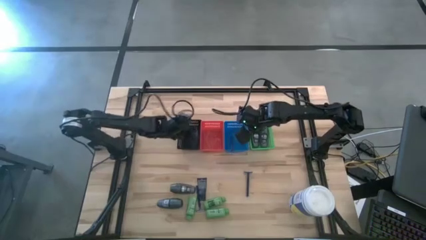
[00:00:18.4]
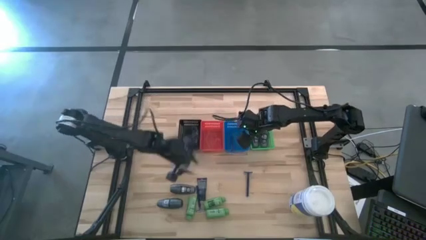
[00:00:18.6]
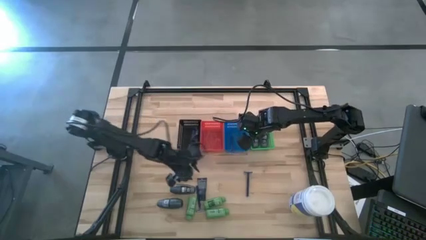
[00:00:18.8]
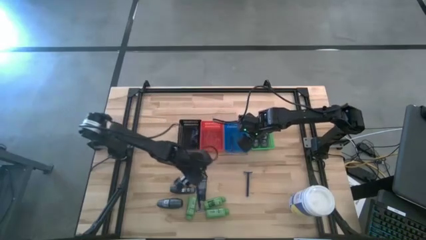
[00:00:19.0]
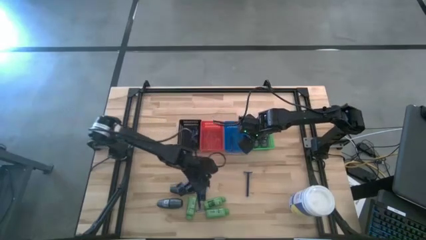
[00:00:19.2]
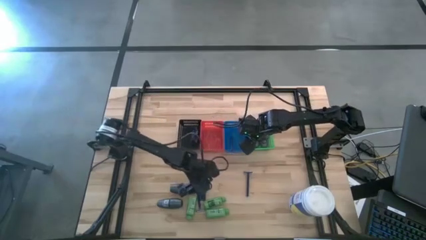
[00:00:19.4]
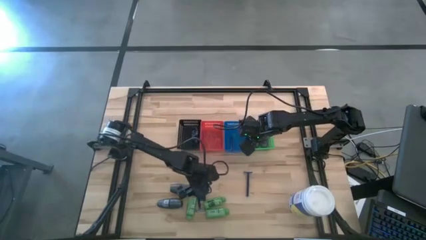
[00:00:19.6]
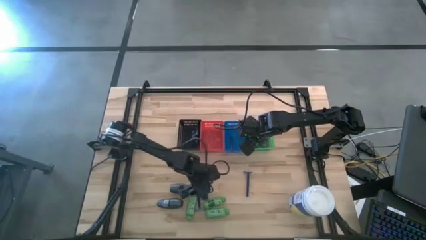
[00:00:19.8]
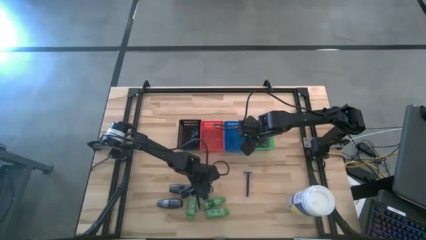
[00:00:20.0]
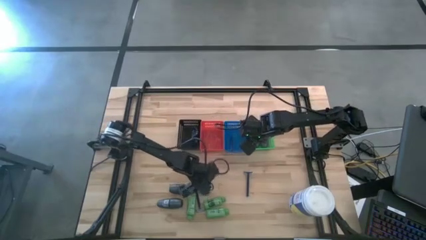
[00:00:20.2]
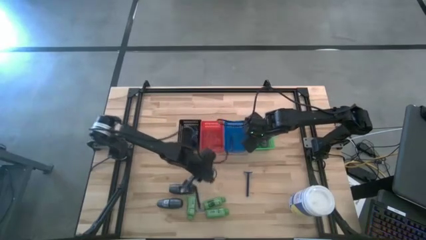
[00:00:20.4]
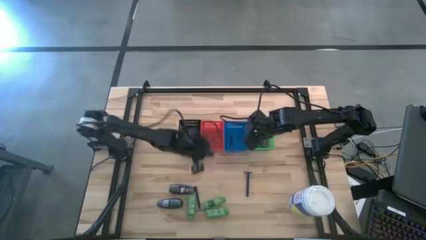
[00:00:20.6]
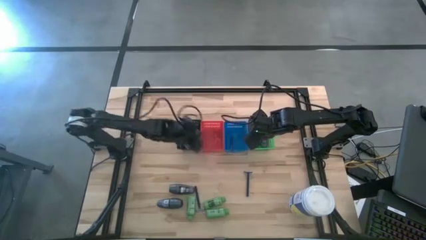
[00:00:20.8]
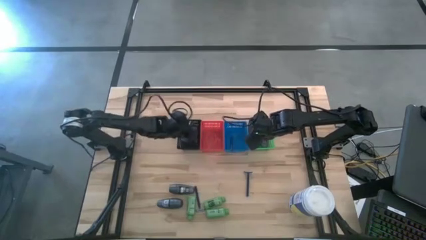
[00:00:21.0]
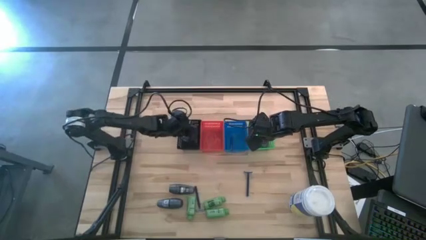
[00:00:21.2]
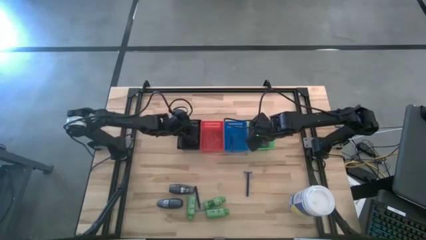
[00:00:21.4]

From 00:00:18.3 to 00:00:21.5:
Task: Pick & Place Travel size toiletries
Put the blue shave cream into the black basket

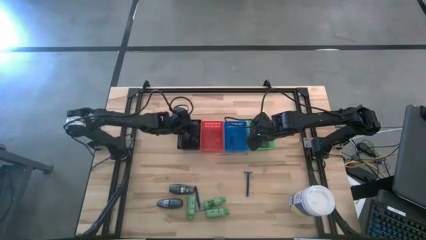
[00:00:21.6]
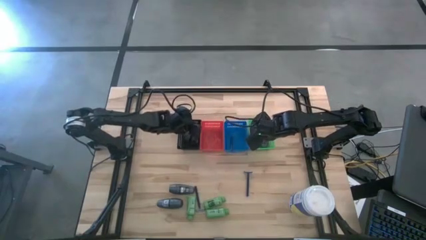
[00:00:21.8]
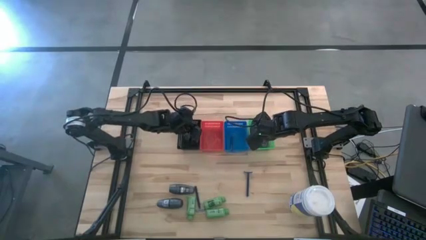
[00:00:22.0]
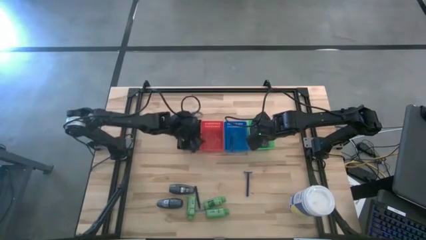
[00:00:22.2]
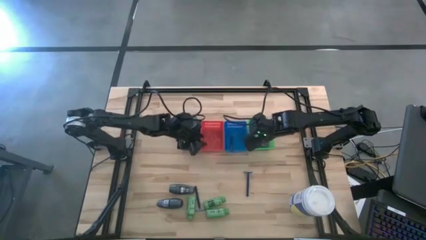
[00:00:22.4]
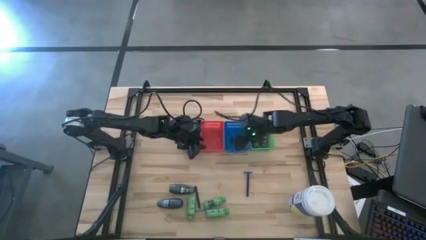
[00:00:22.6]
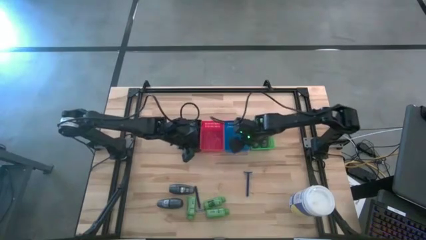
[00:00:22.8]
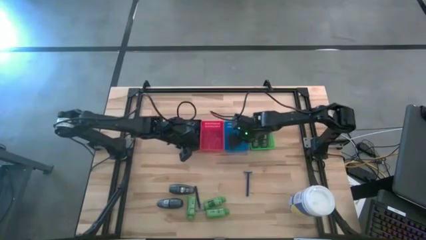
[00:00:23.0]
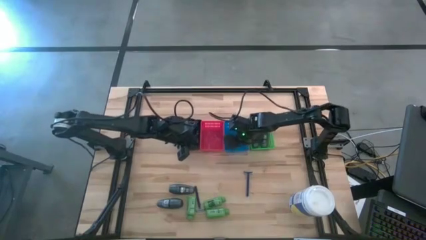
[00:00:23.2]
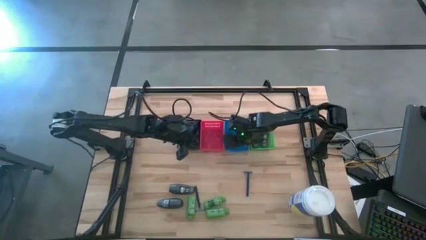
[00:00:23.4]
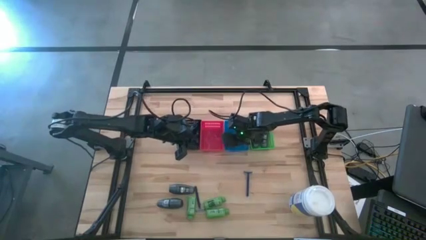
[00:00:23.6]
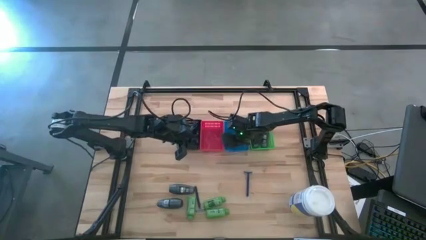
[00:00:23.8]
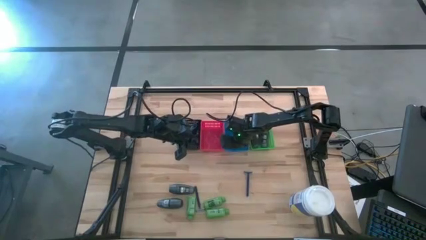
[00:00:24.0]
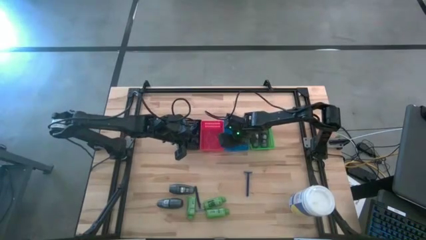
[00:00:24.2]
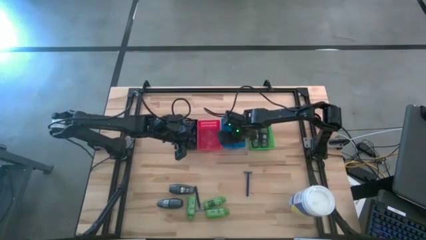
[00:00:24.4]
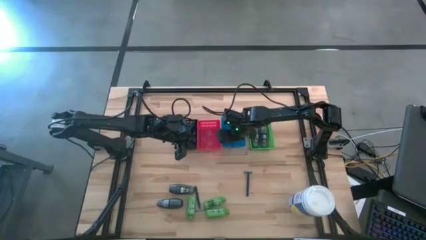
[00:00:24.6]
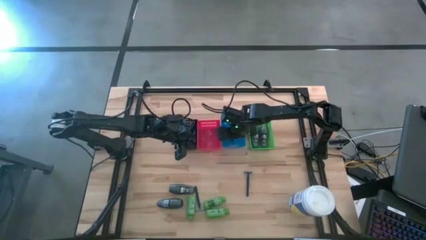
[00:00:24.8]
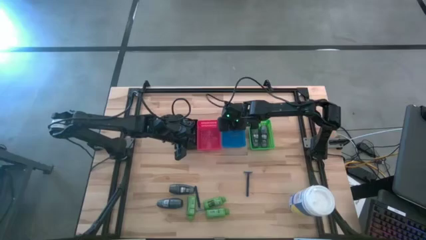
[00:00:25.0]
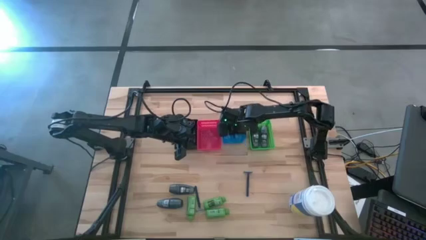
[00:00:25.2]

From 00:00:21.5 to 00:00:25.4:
Adjust the blue razor in the blue basket

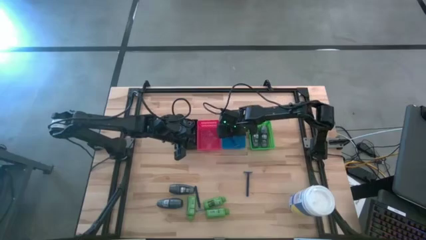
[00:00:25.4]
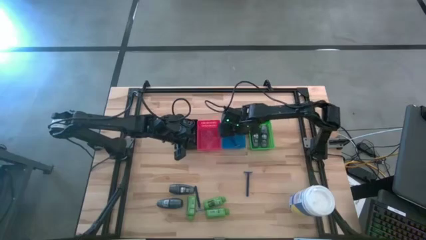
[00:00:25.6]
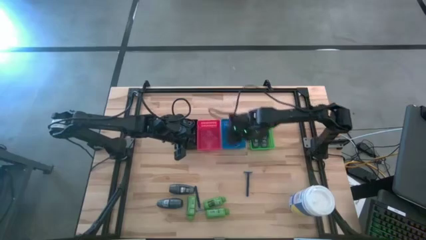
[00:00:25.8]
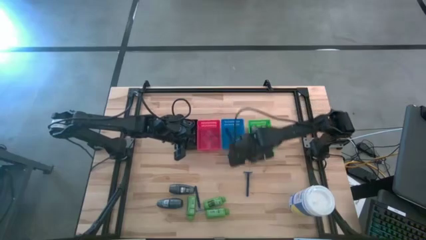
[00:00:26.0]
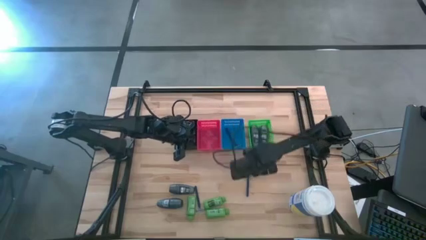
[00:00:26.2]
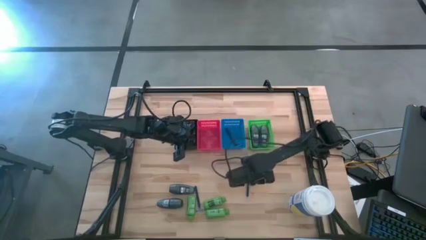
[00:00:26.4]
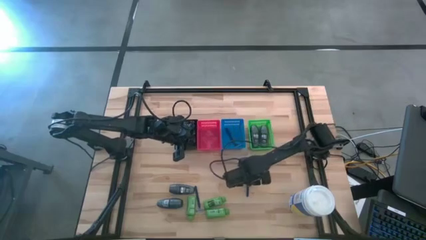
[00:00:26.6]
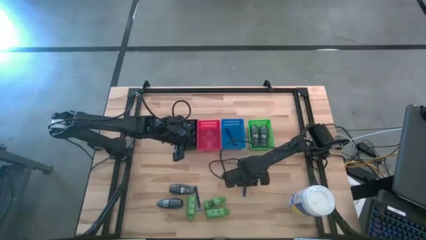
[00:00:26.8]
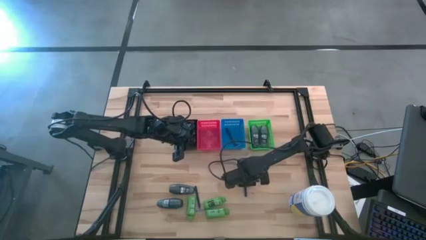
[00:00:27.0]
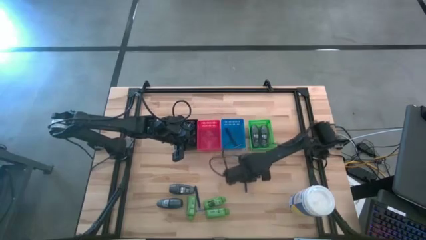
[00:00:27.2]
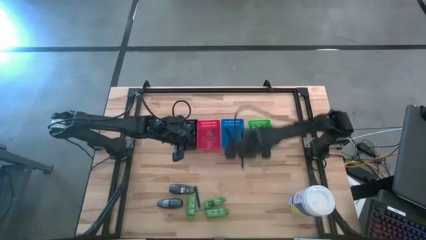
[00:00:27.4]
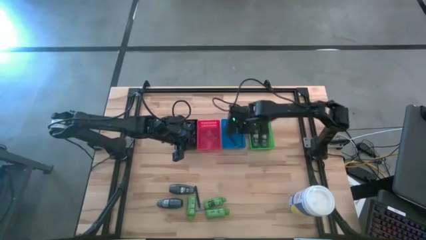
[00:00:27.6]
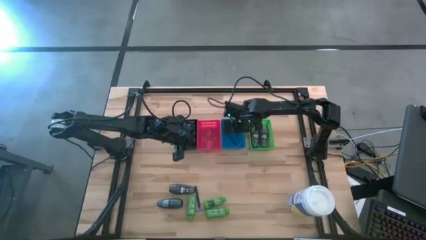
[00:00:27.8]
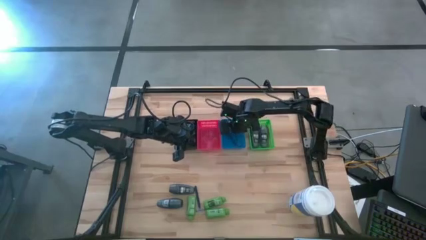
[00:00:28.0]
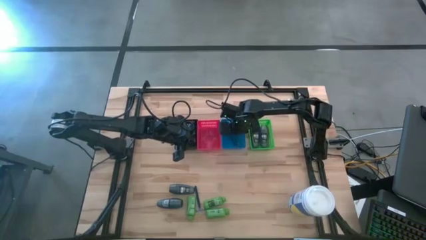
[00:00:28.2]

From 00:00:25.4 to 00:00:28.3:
Put the blue razor into the blue basket

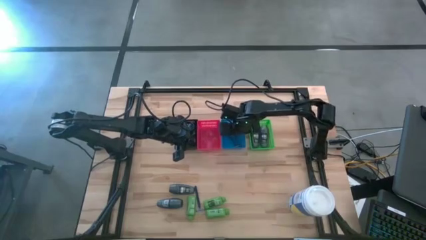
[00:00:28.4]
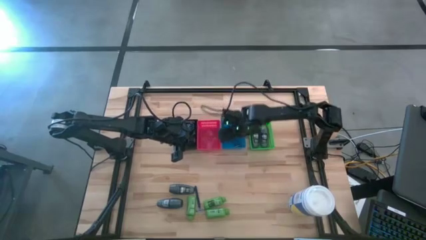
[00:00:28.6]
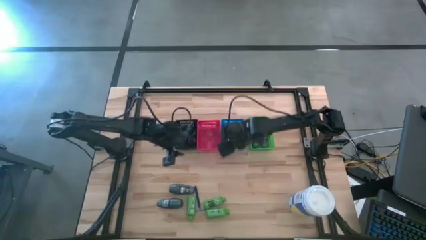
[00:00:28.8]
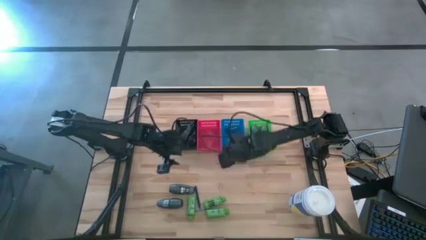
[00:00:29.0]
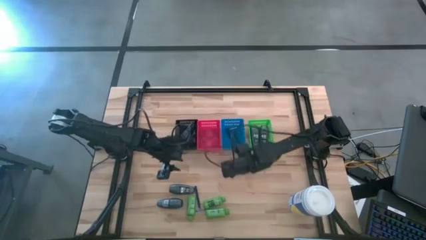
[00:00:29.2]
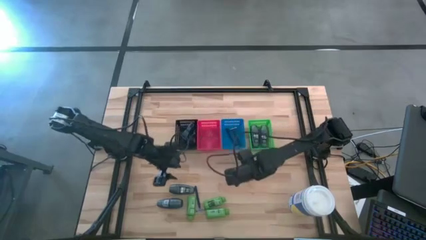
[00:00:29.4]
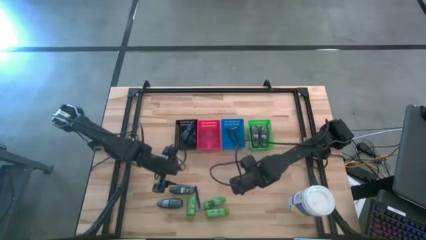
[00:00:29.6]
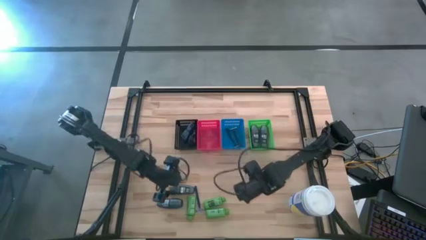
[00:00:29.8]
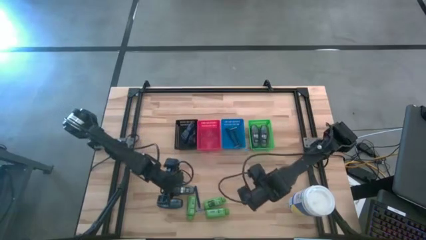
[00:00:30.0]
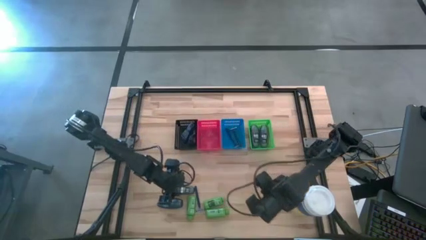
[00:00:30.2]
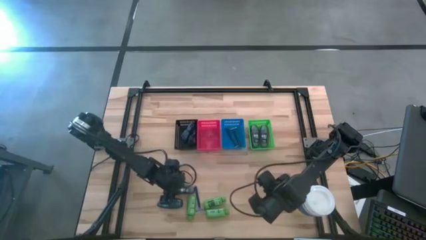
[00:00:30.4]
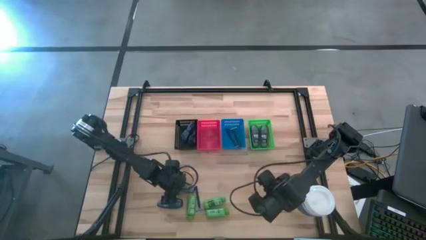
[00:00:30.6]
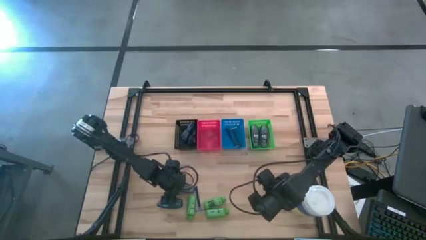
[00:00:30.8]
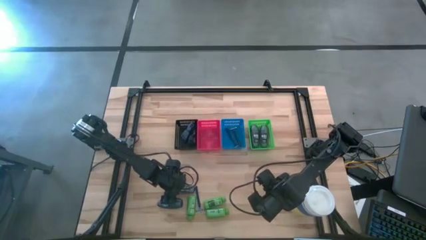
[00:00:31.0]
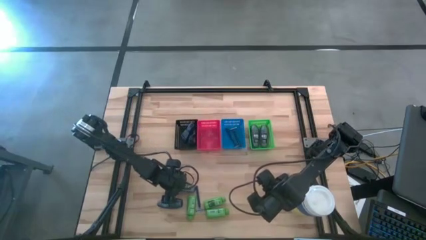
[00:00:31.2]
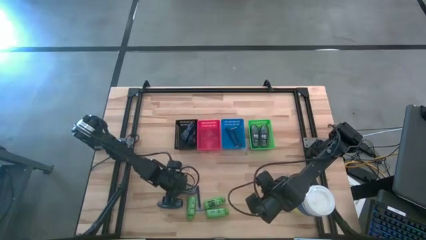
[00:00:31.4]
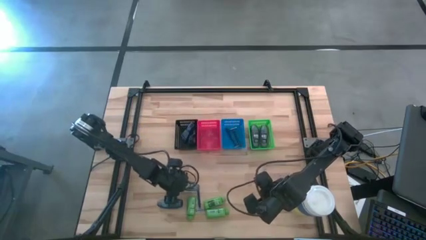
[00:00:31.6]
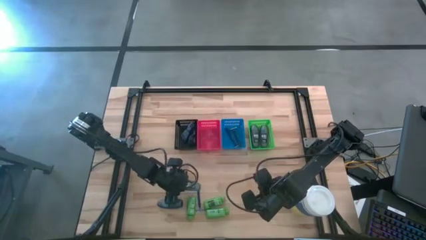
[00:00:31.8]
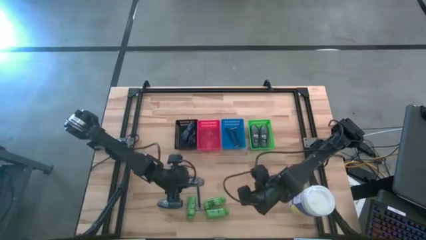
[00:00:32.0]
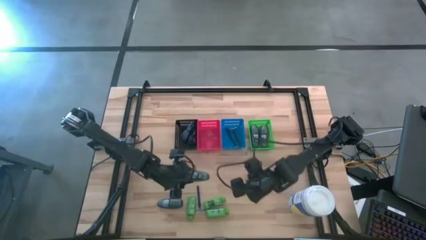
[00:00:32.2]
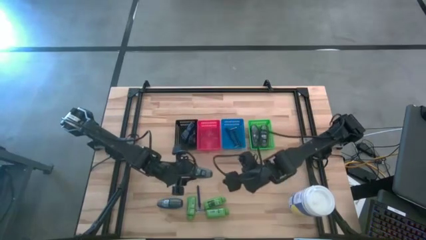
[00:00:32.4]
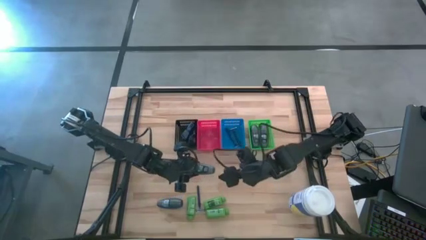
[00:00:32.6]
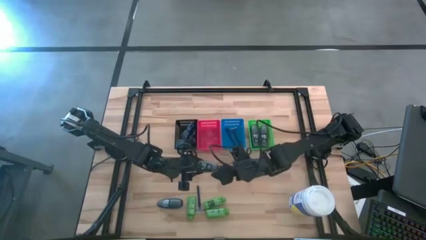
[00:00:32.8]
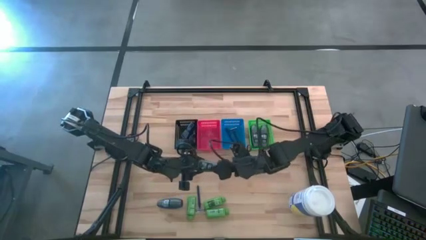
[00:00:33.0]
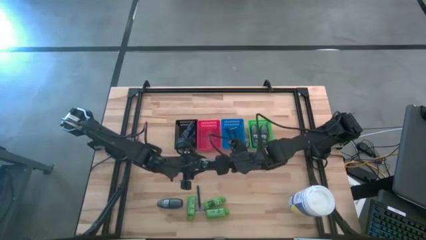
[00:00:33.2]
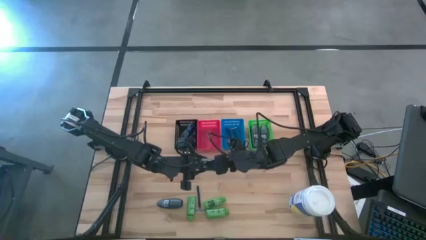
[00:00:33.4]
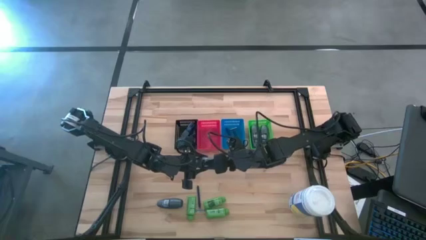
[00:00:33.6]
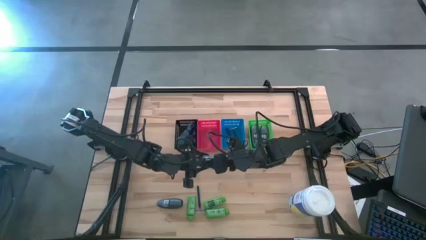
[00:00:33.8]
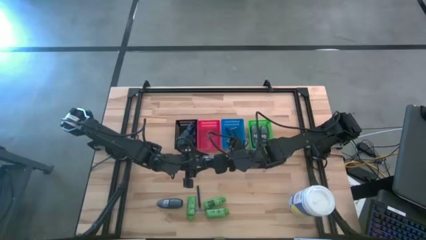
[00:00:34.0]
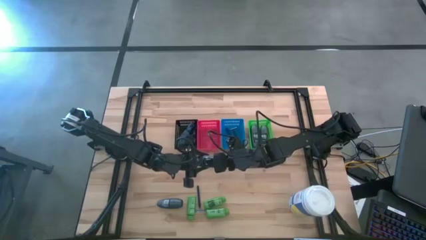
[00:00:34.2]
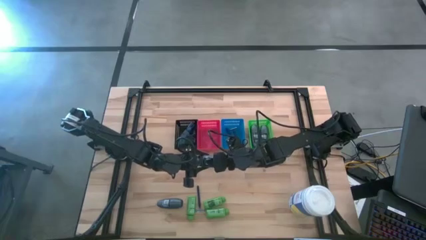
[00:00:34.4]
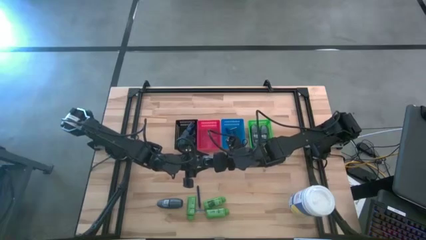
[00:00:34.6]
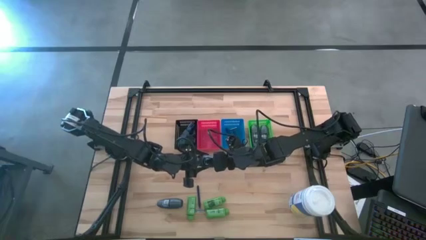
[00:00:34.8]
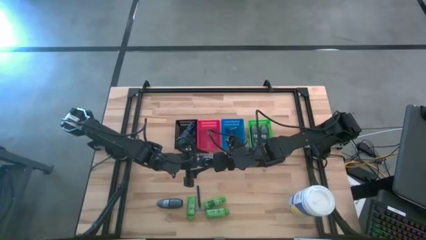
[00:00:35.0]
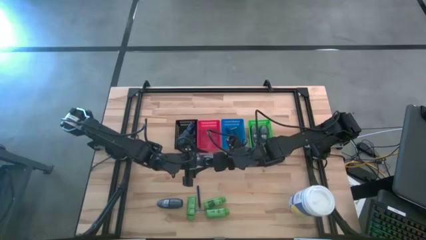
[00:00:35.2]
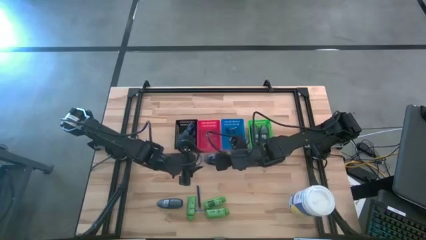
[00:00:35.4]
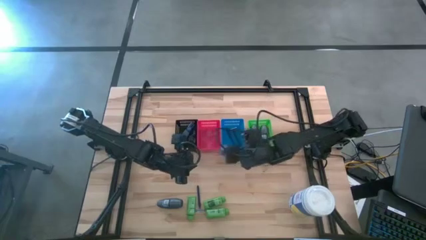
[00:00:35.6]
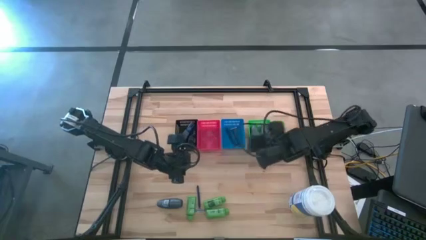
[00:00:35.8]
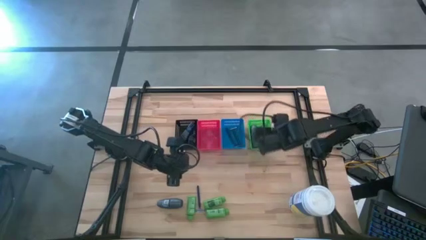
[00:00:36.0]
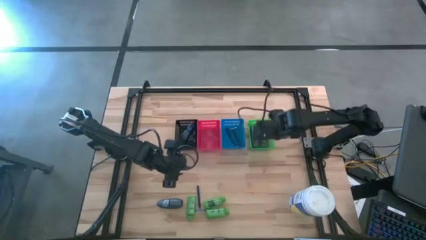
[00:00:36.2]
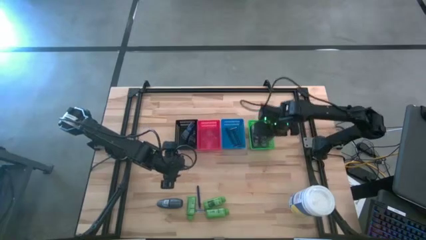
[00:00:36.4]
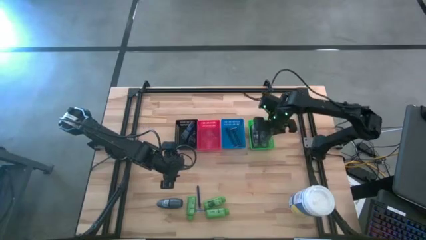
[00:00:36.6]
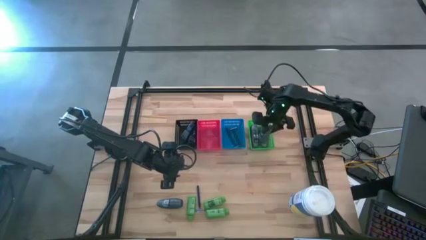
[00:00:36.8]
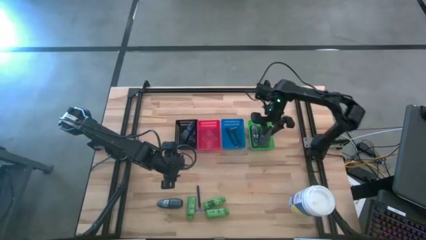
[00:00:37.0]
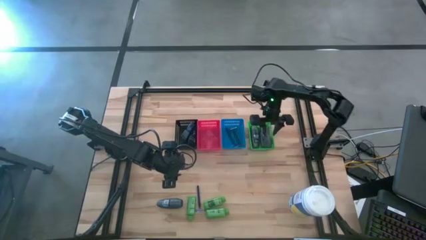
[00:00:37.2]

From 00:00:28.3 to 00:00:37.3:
Put the black deodorant into the green basket
